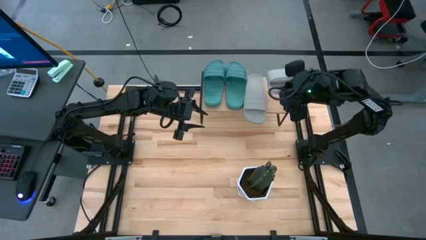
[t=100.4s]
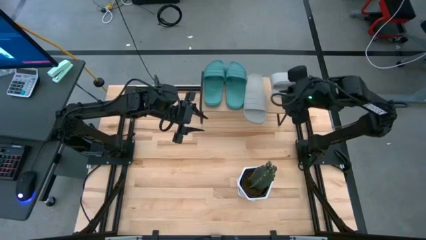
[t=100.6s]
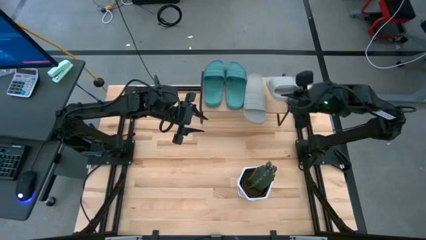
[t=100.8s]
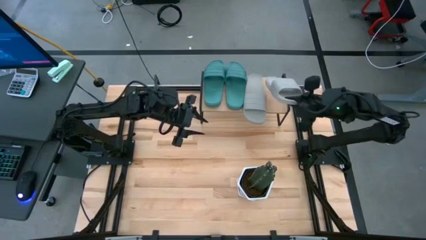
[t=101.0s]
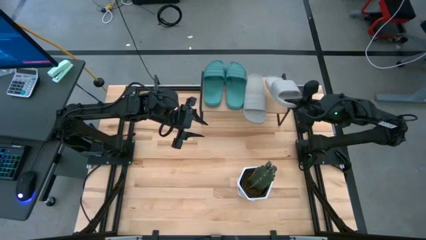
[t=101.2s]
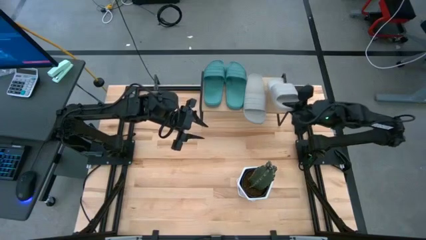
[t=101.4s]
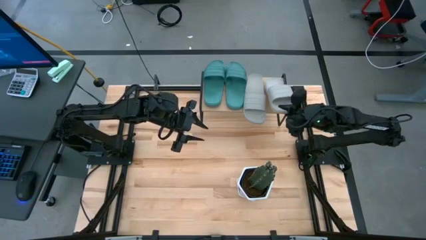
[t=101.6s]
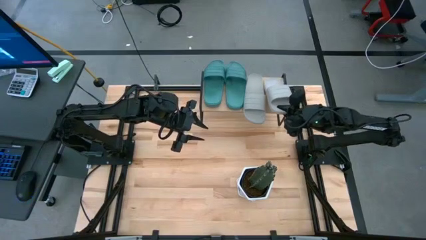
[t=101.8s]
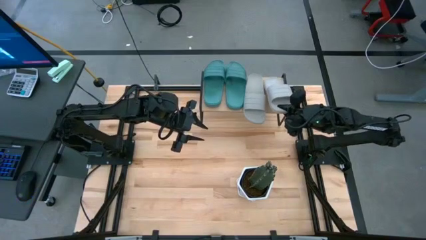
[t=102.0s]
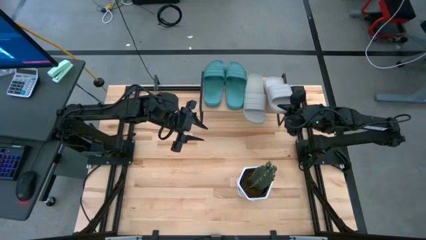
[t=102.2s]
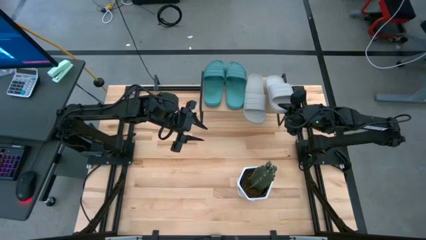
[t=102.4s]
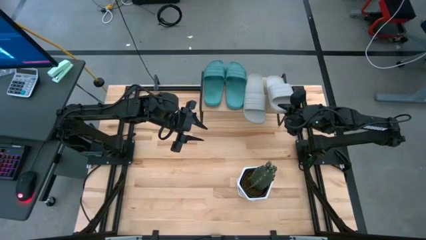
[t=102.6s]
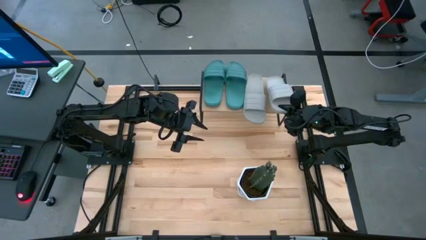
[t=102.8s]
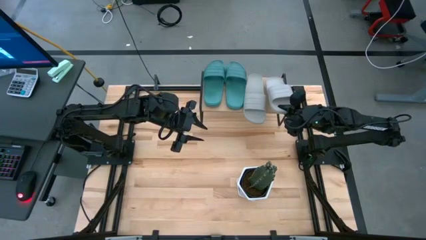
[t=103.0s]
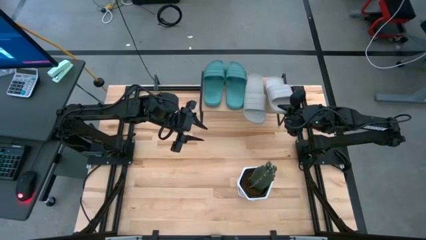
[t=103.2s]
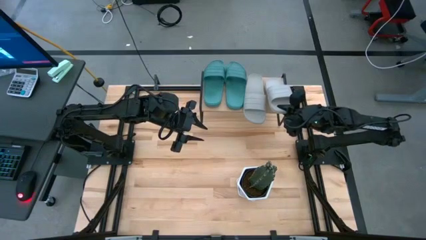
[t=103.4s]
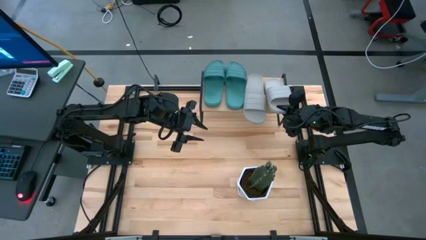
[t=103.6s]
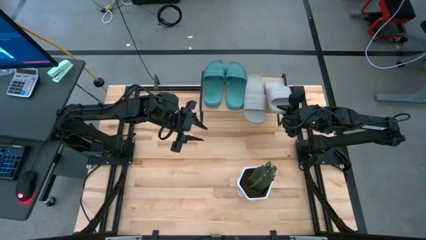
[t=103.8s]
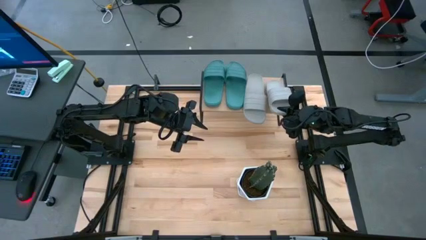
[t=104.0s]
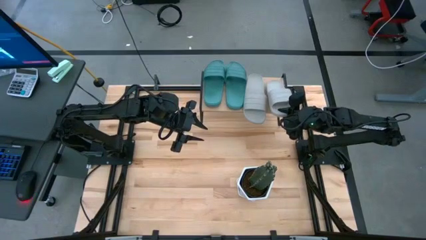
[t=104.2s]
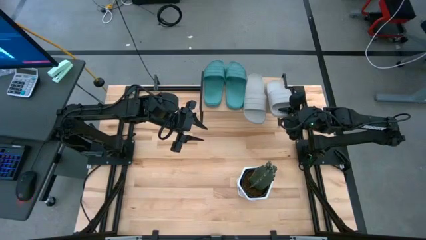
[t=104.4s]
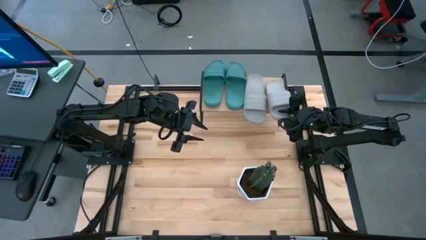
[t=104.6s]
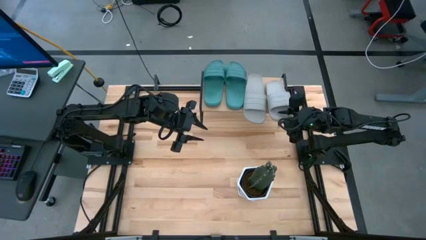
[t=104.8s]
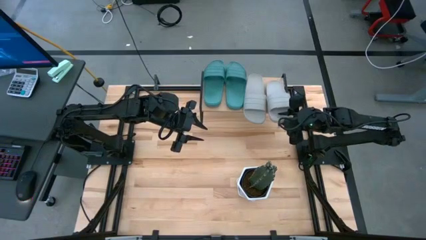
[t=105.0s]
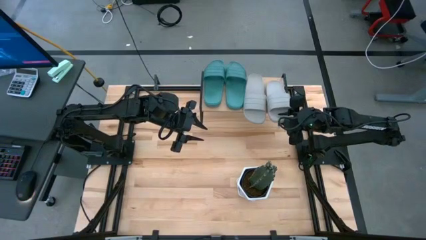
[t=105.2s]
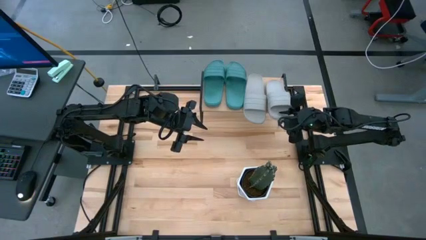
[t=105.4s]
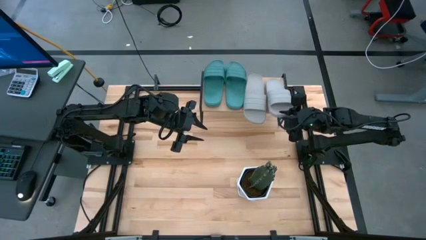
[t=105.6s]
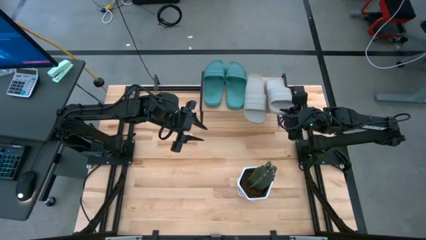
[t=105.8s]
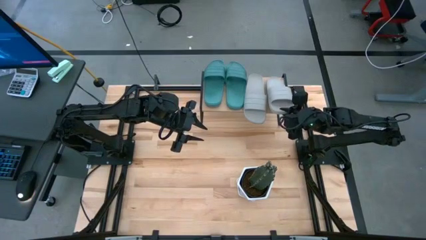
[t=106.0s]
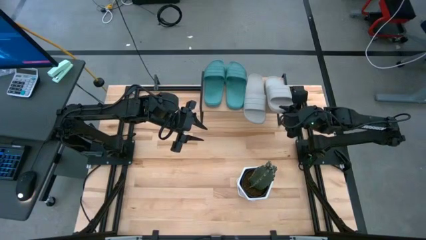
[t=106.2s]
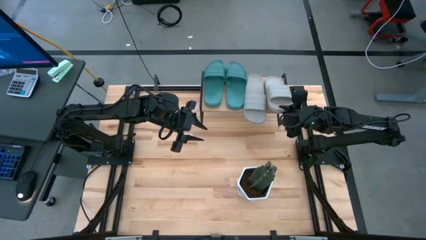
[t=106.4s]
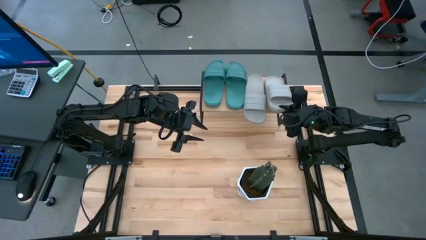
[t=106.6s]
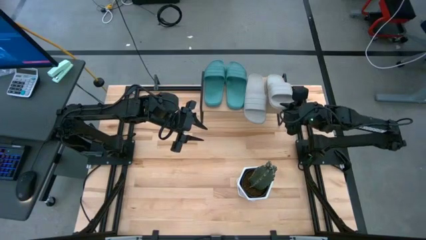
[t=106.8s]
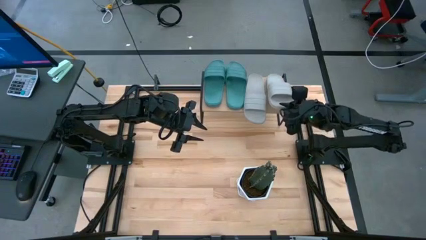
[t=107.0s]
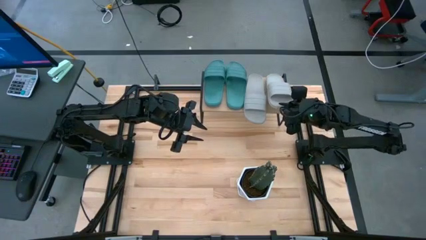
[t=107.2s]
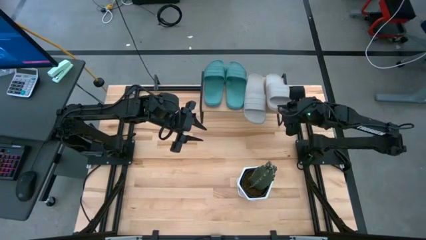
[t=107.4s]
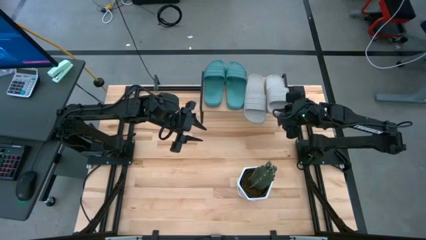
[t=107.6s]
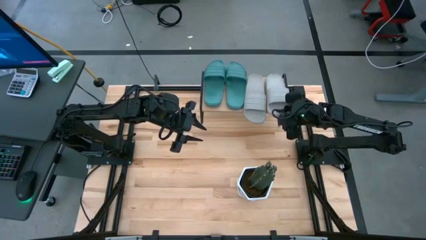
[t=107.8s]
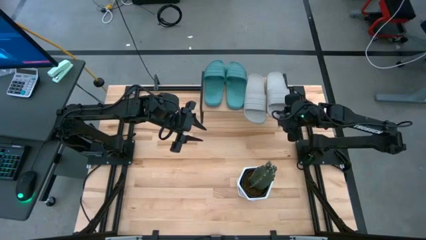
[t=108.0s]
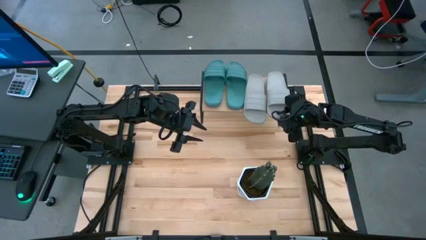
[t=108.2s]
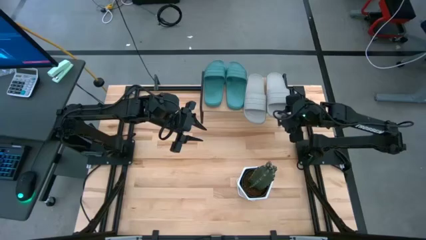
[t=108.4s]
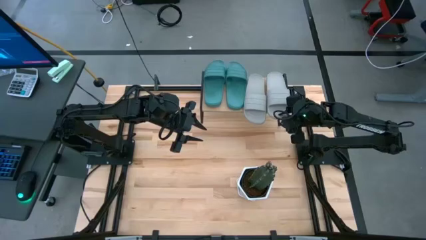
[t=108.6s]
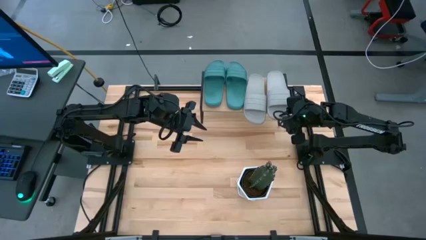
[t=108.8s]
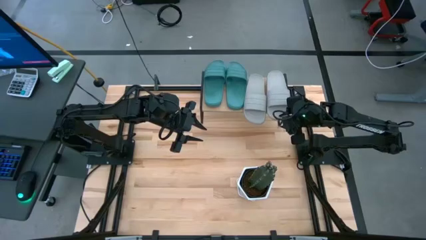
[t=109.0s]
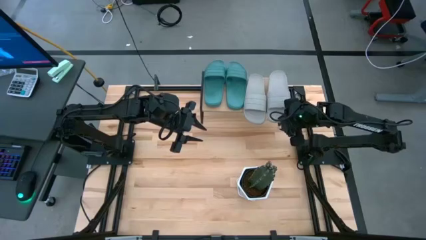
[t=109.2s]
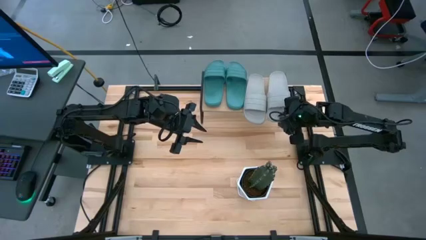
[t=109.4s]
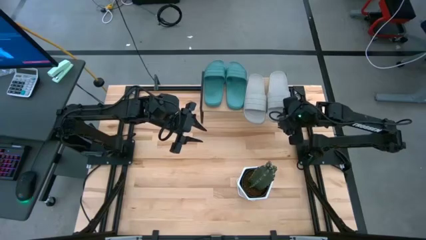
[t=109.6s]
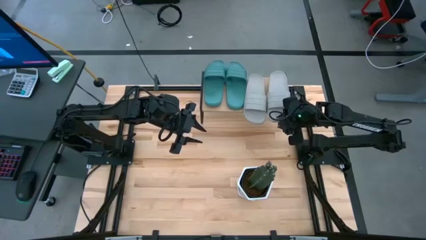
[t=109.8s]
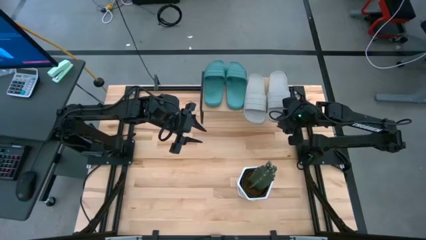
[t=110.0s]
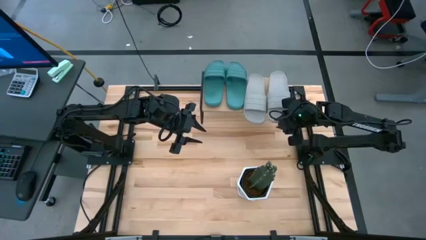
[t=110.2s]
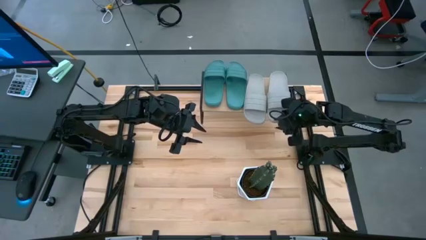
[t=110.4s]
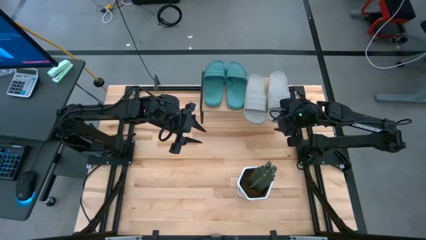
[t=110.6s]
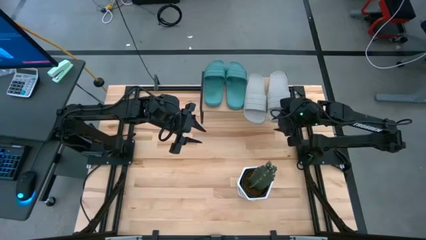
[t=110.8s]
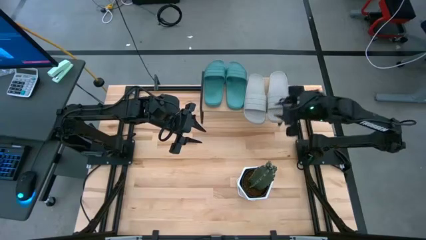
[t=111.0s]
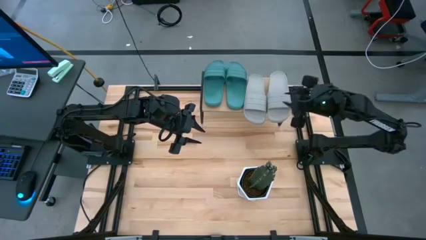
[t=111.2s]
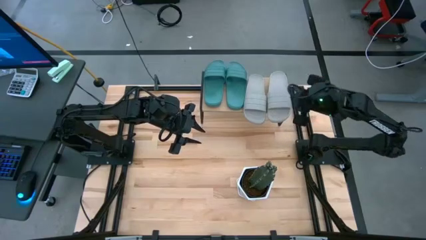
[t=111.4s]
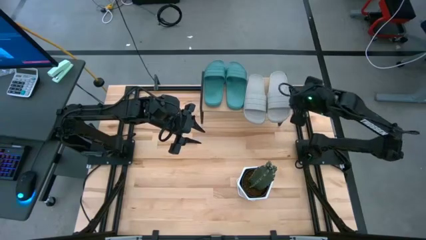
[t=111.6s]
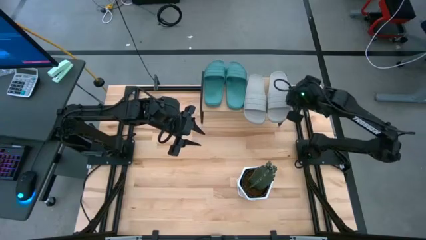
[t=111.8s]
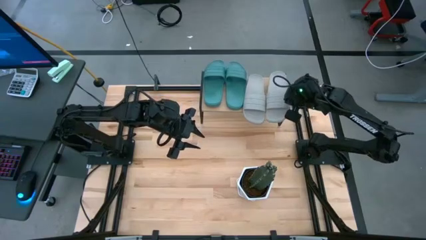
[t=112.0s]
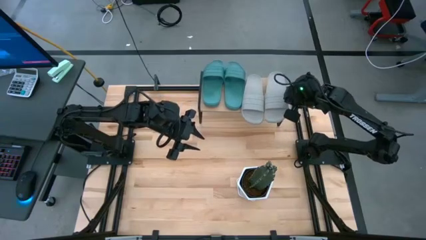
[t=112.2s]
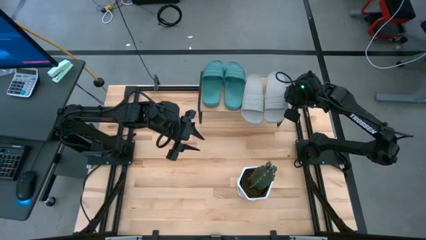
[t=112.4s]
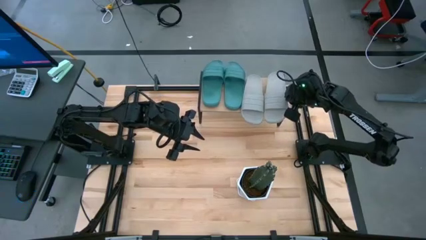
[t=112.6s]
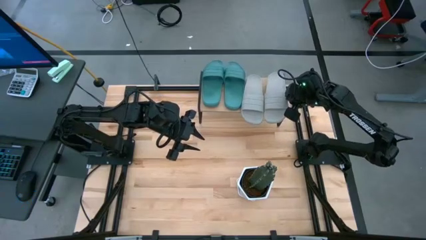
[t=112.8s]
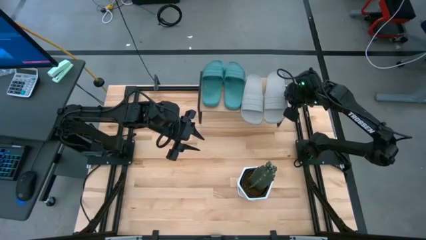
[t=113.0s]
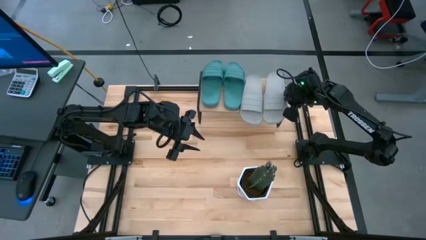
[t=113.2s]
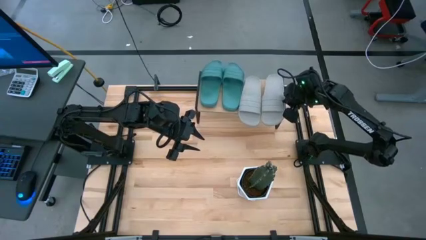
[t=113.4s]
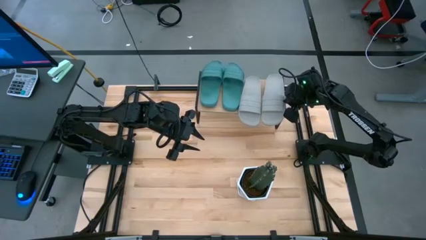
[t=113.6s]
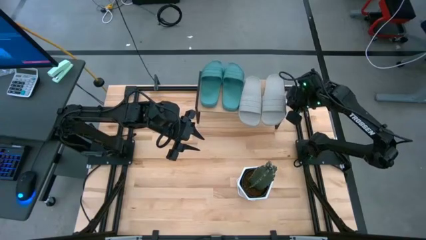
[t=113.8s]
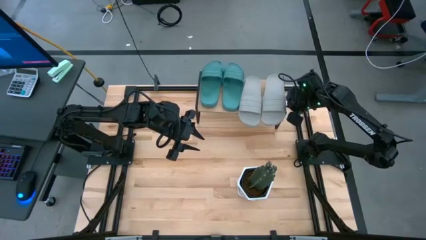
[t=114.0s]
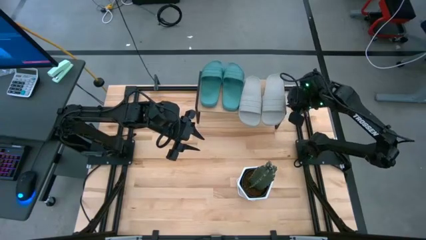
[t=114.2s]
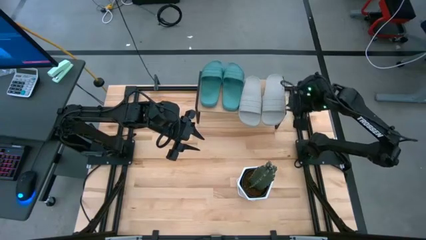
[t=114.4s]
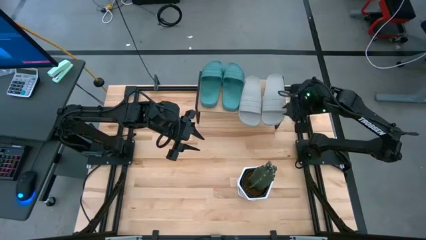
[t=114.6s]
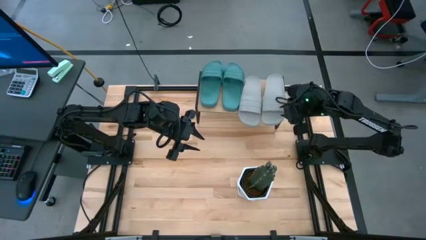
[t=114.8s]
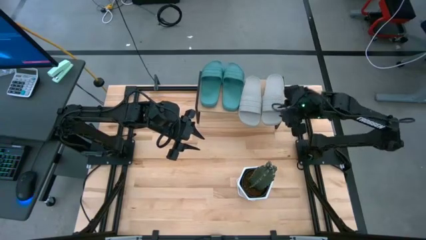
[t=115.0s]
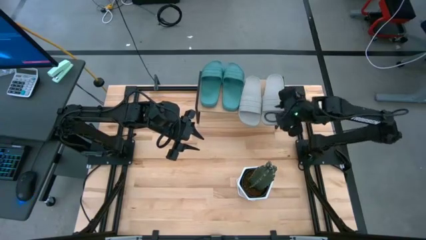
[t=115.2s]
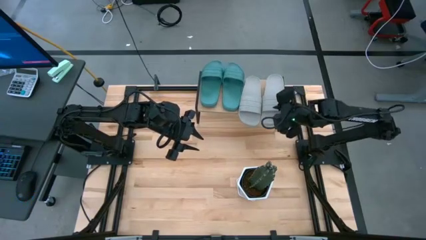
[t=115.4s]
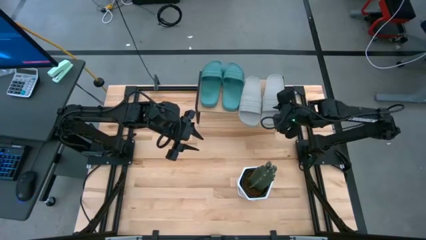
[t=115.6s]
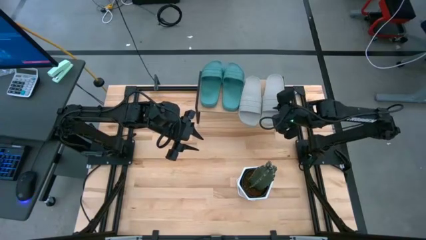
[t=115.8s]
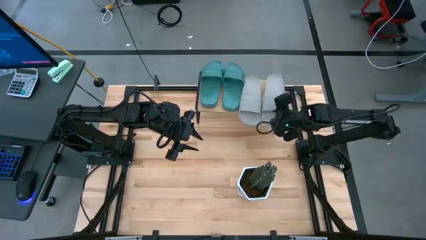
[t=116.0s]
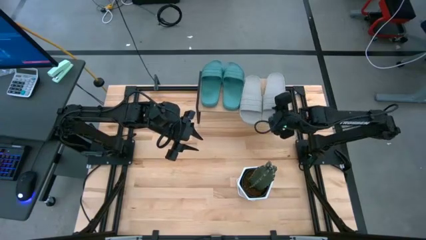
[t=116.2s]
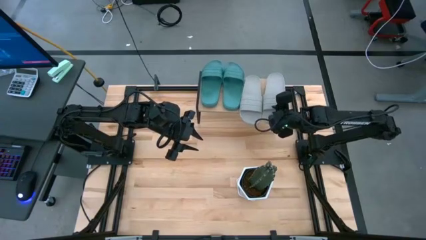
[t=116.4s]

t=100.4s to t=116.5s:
Task: Pick and place slides into the shelf
Put the gray slides on the shelf
